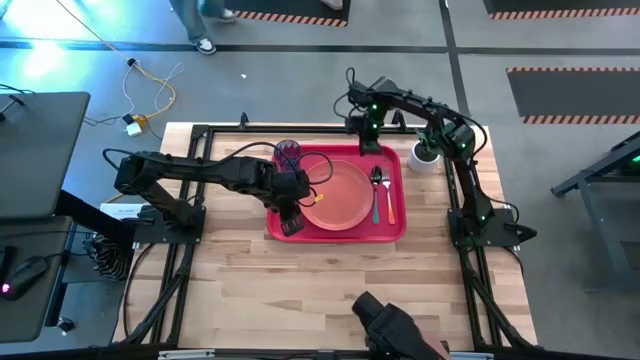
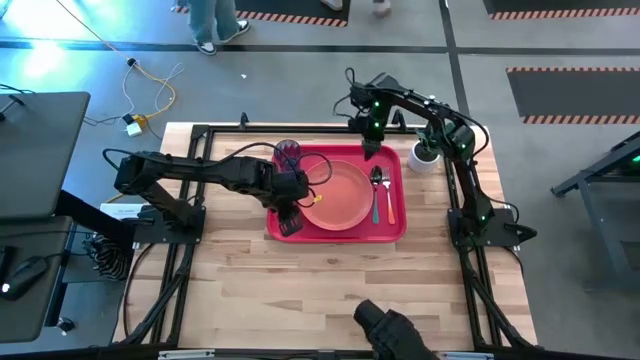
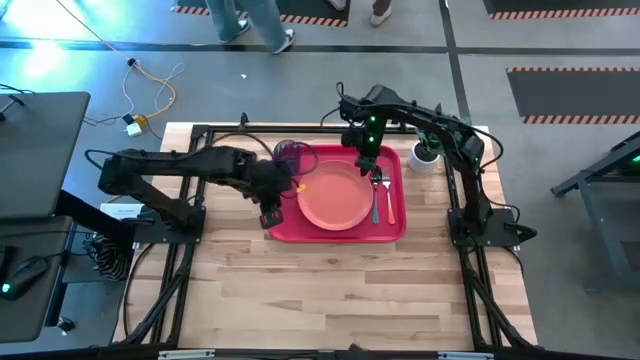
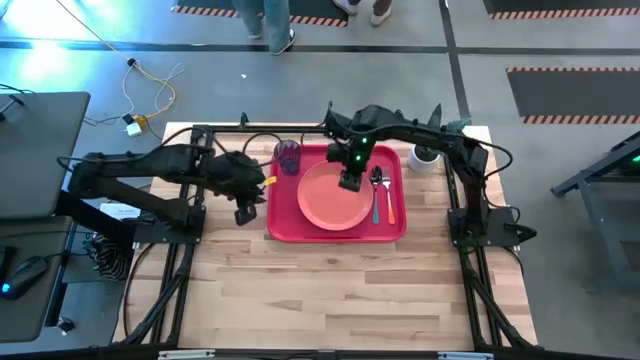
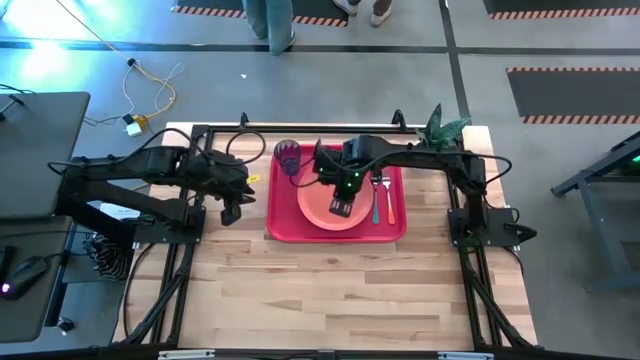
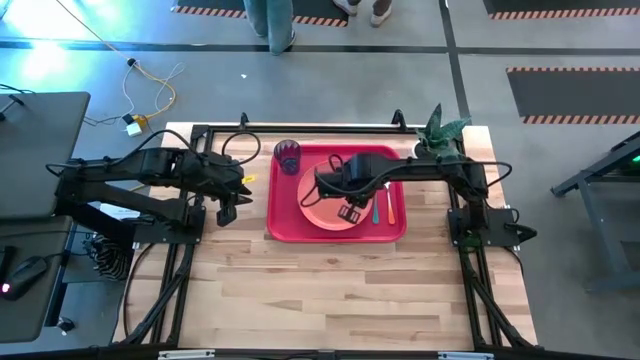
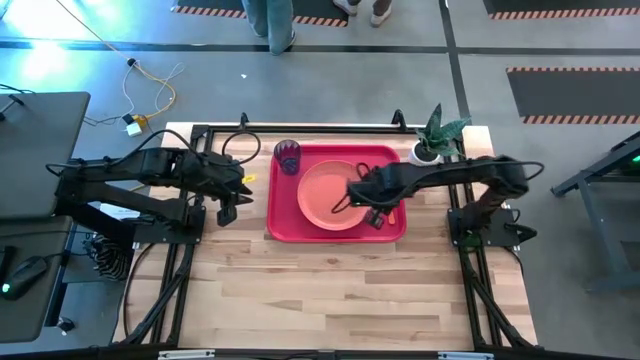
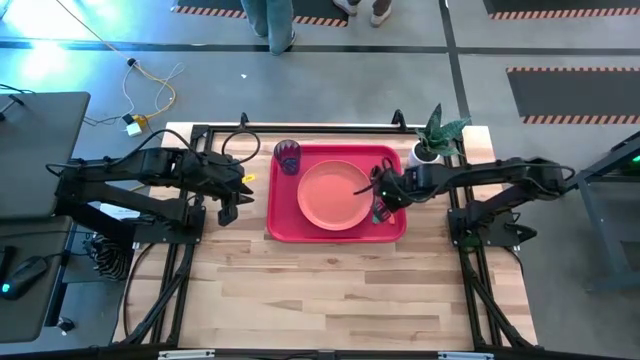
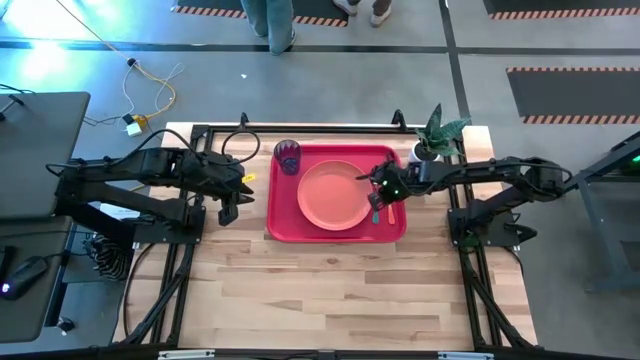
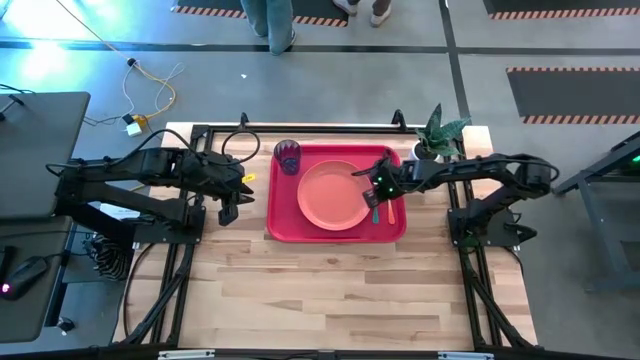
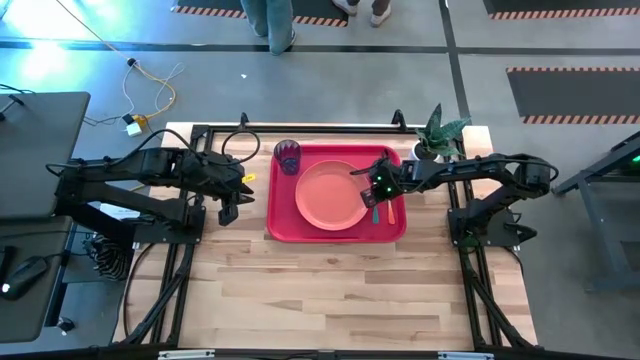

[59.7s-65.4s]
Task: Pick and place plate/cup/fork/spoon on tray
Adjust the orange plate on the red serving tray

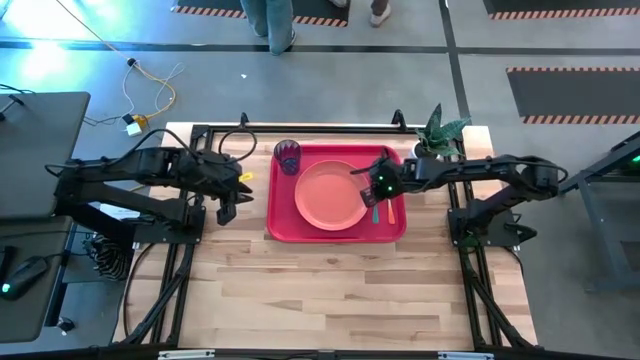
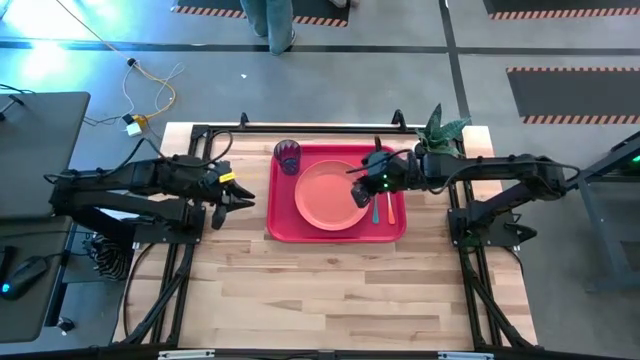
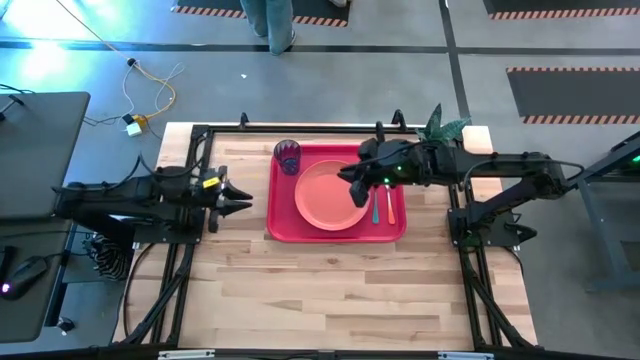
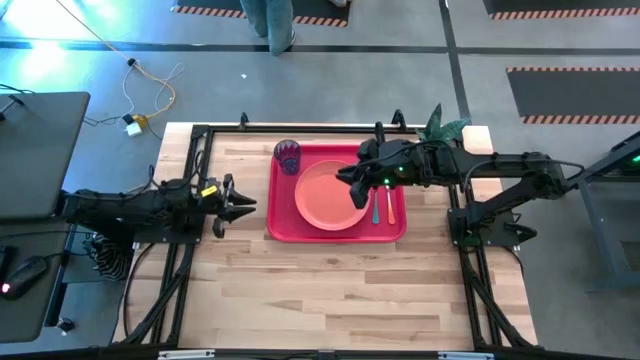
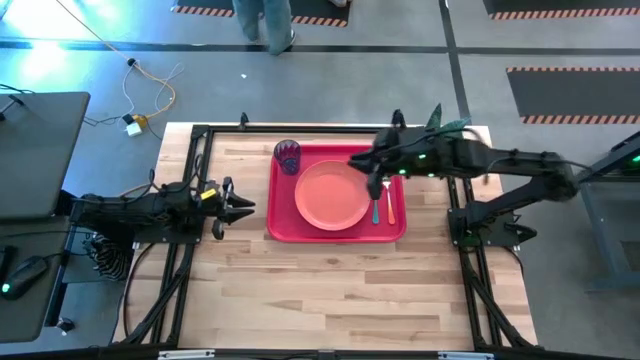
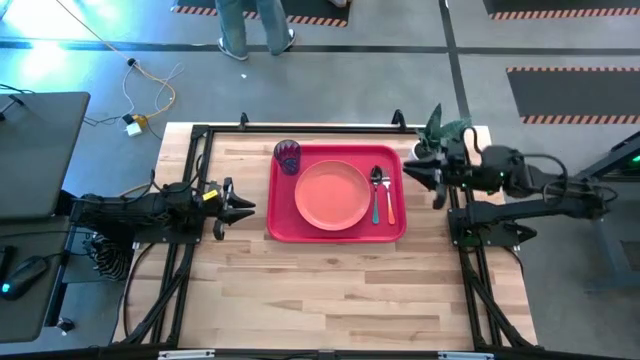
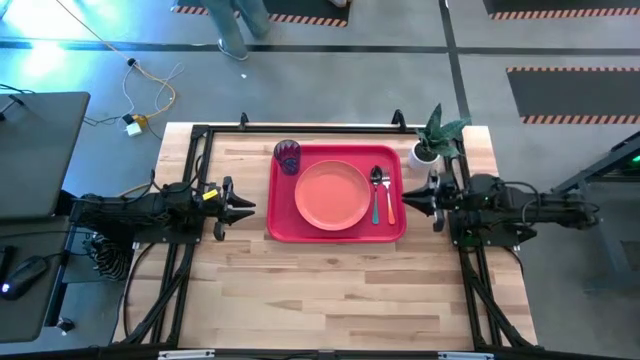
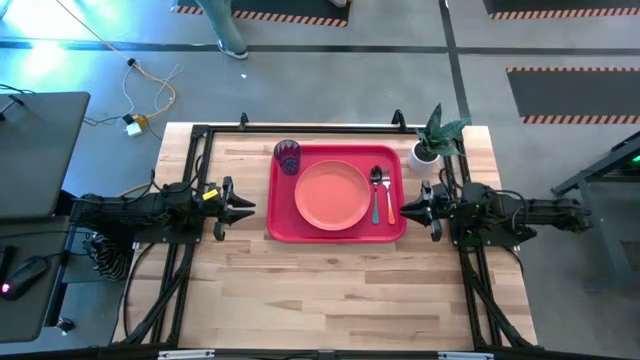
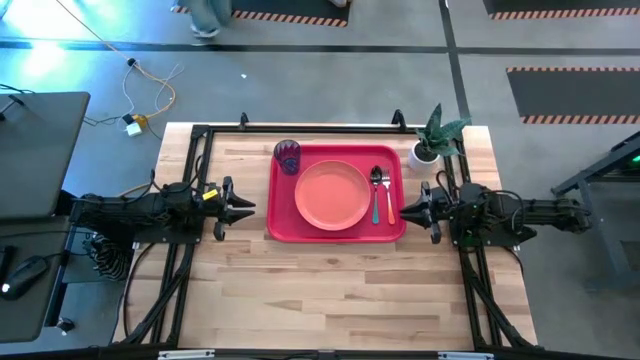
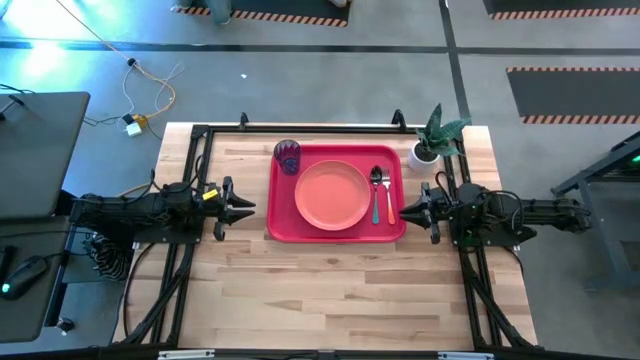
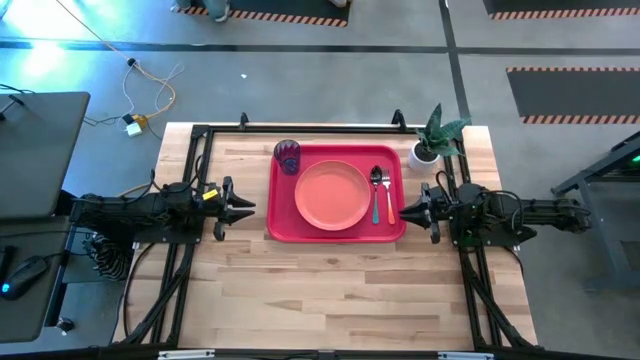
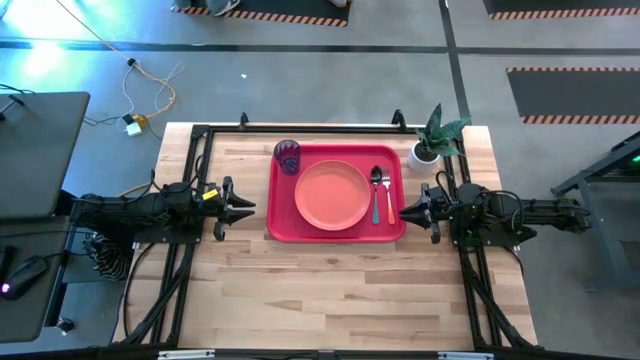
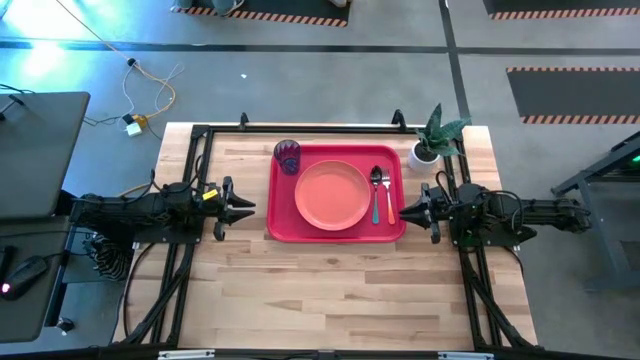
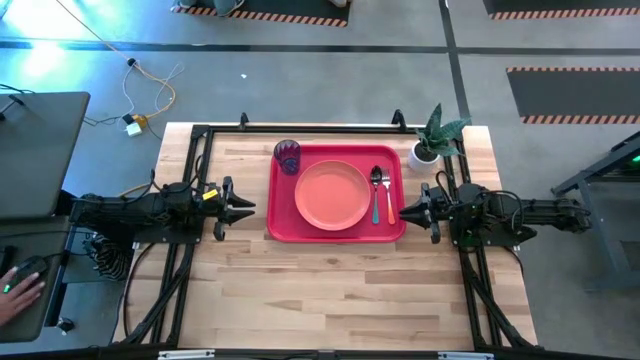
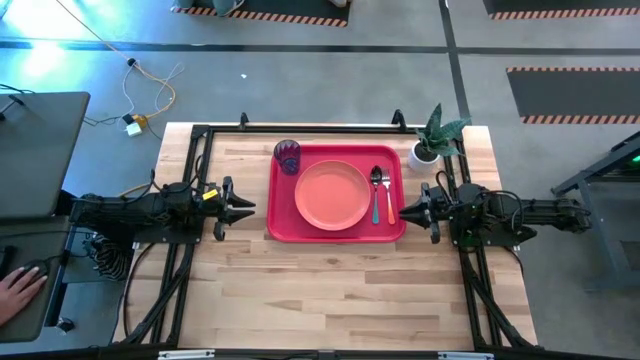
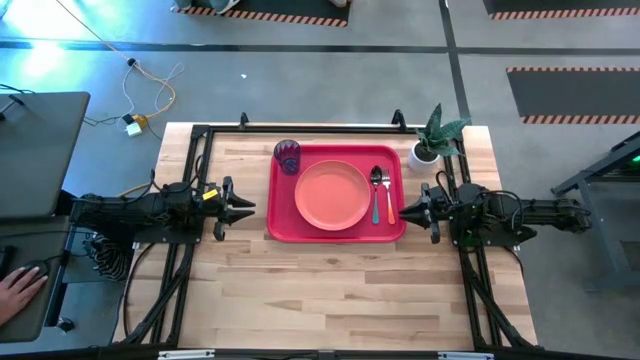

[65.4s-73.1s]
Return to Home Position
